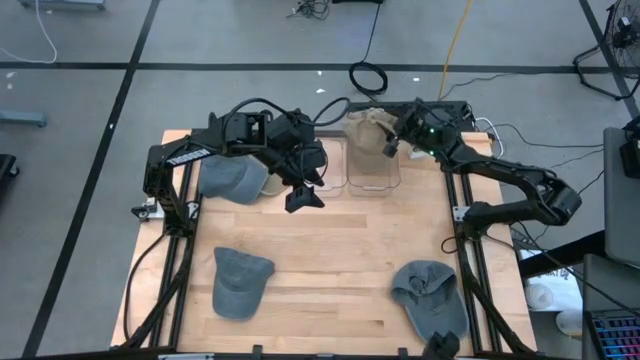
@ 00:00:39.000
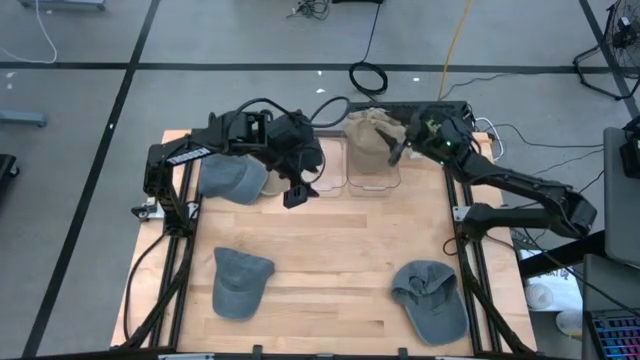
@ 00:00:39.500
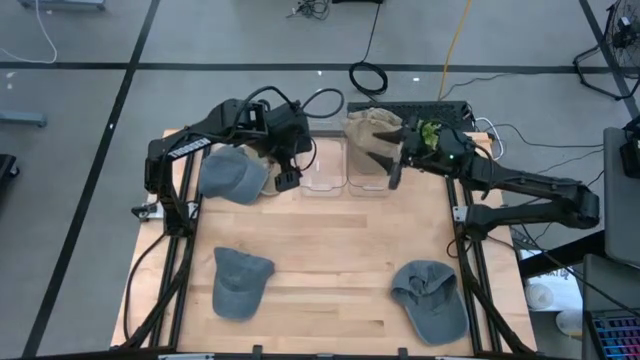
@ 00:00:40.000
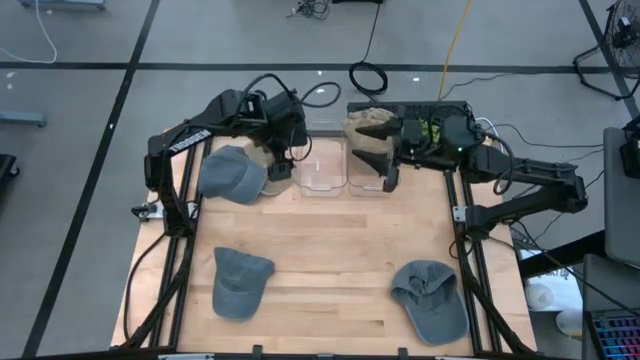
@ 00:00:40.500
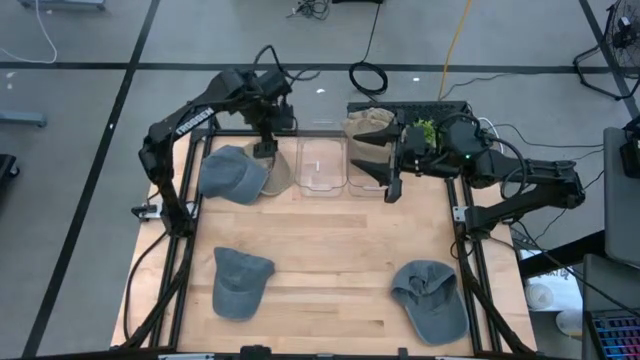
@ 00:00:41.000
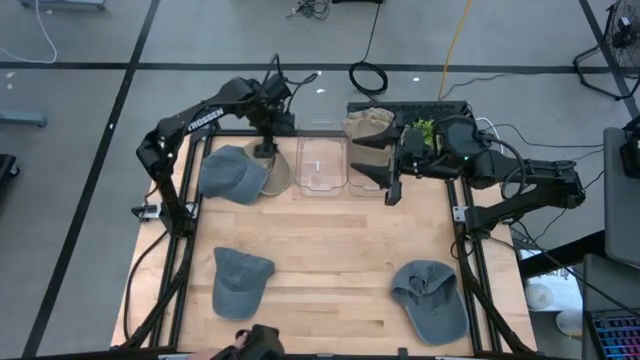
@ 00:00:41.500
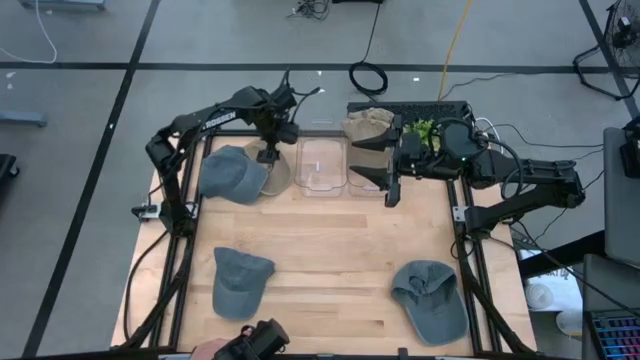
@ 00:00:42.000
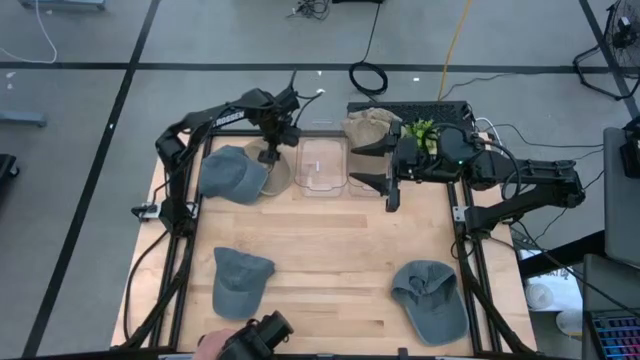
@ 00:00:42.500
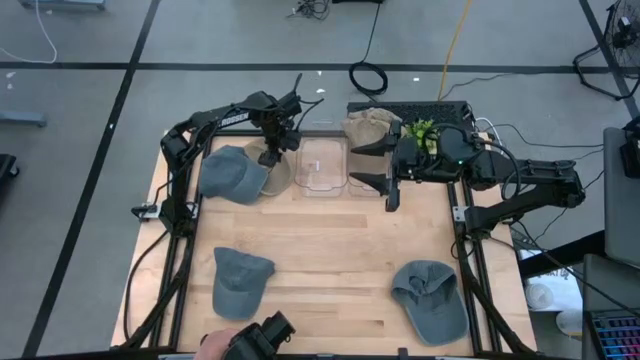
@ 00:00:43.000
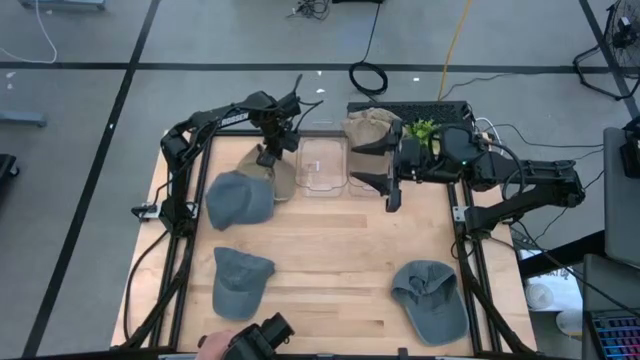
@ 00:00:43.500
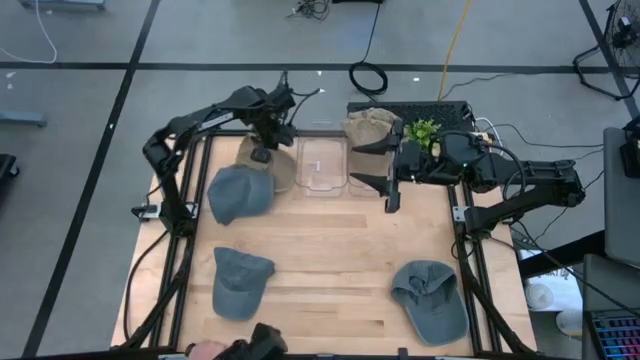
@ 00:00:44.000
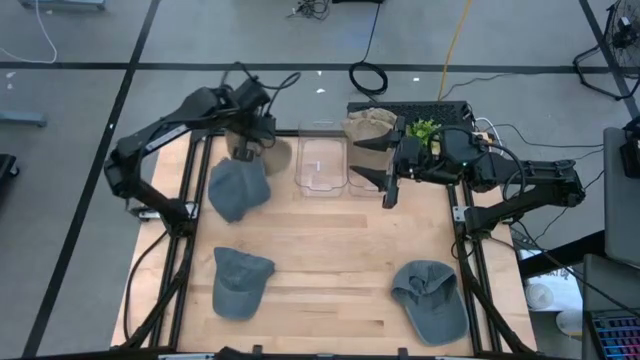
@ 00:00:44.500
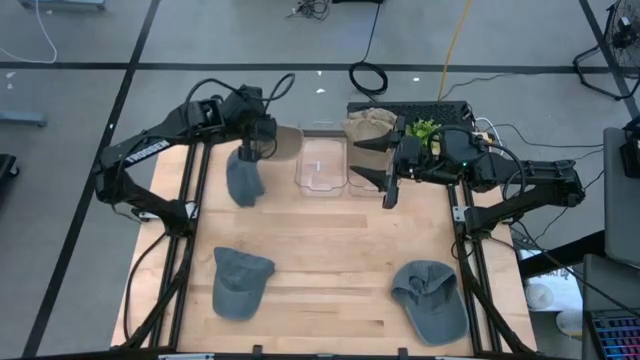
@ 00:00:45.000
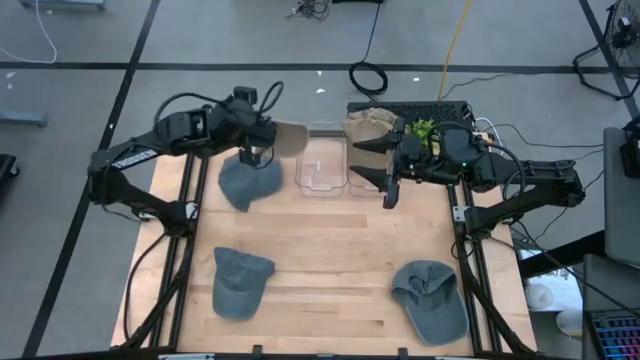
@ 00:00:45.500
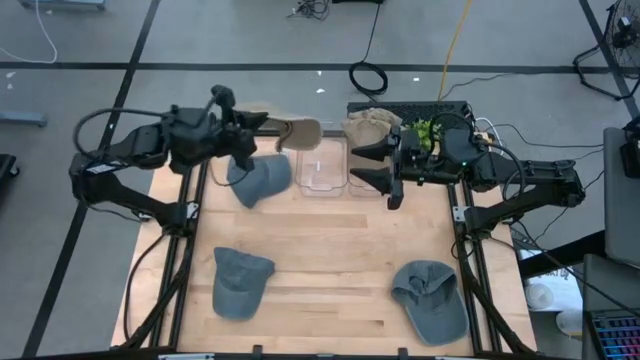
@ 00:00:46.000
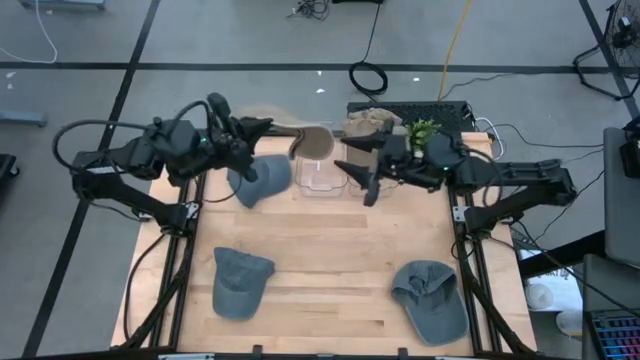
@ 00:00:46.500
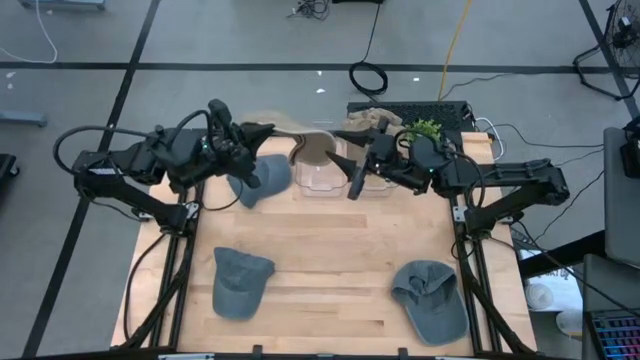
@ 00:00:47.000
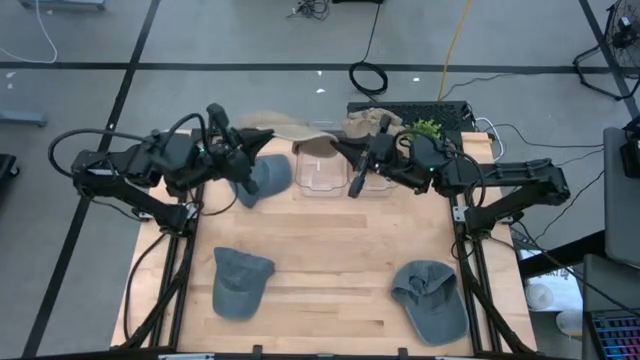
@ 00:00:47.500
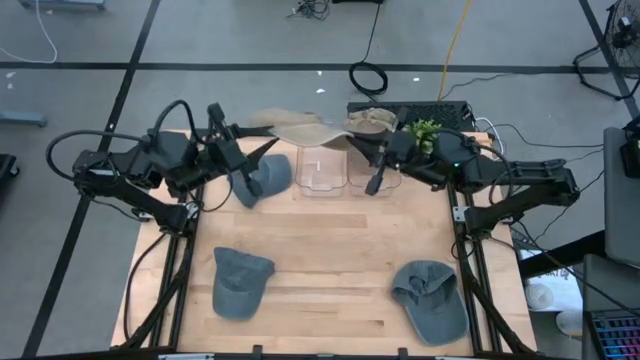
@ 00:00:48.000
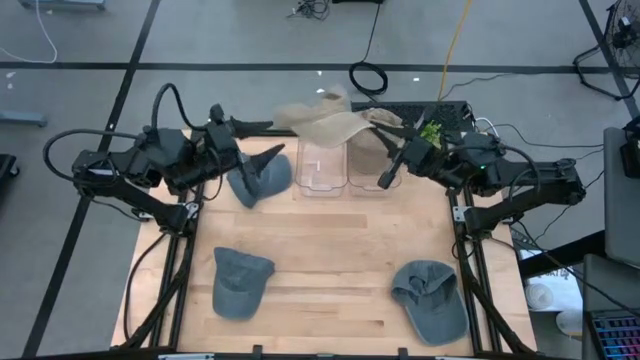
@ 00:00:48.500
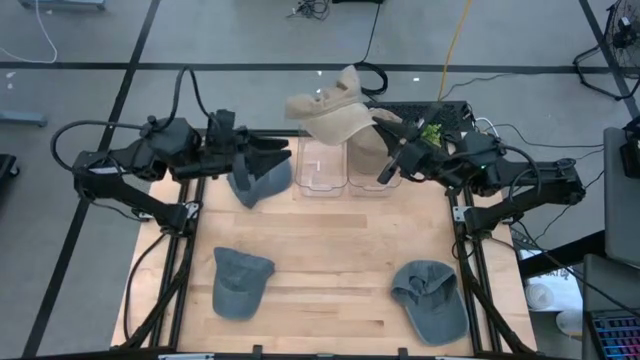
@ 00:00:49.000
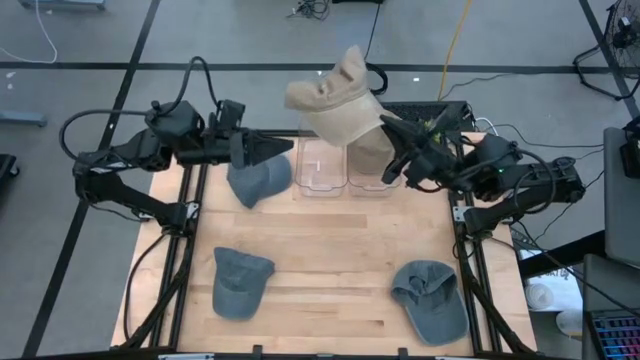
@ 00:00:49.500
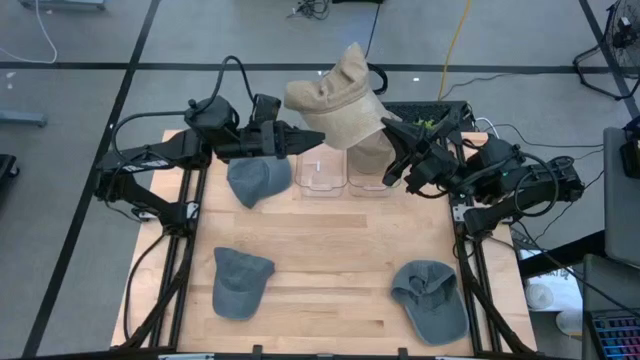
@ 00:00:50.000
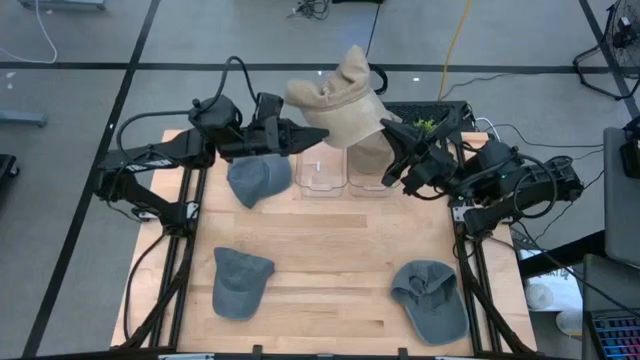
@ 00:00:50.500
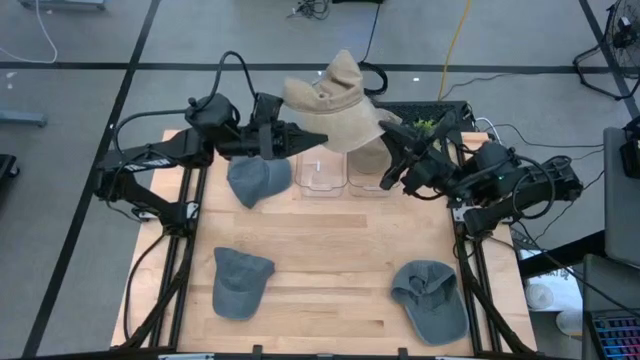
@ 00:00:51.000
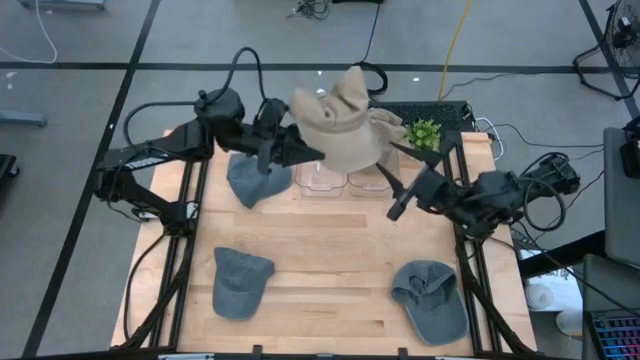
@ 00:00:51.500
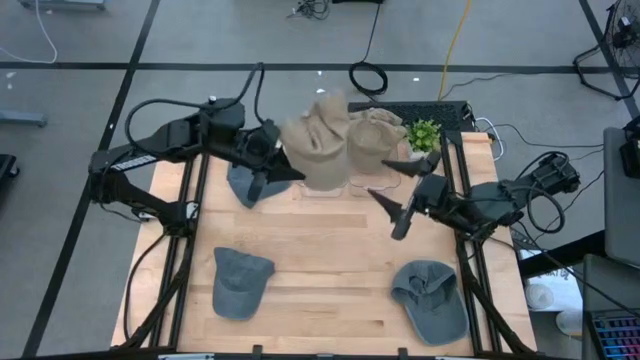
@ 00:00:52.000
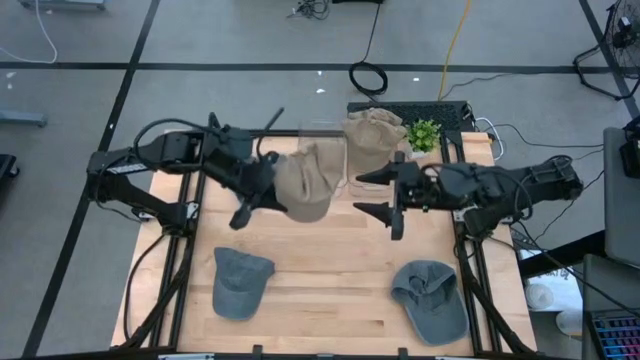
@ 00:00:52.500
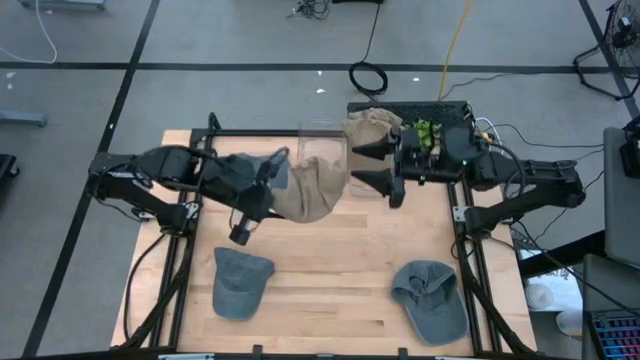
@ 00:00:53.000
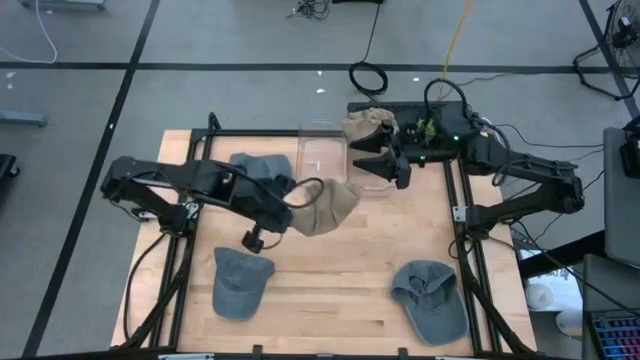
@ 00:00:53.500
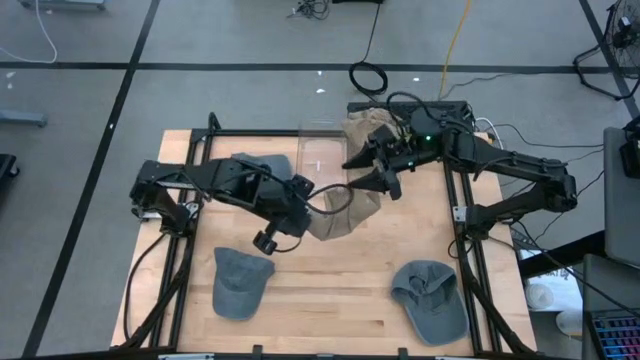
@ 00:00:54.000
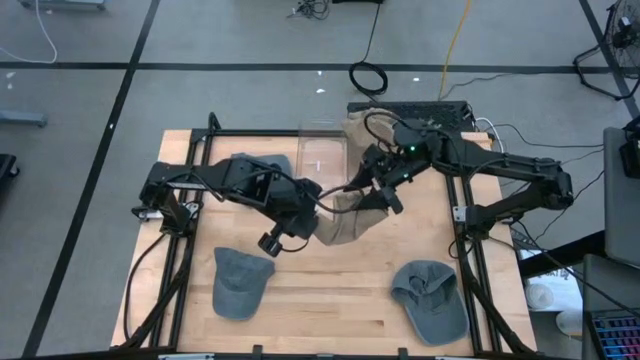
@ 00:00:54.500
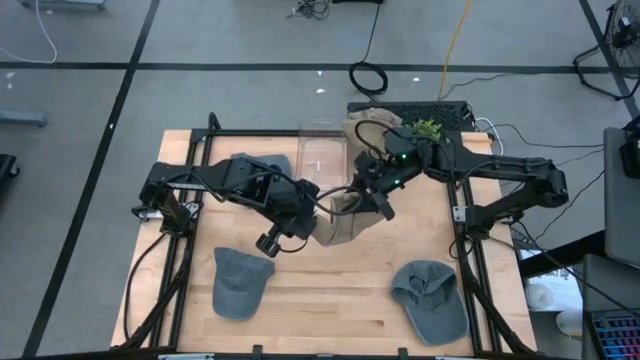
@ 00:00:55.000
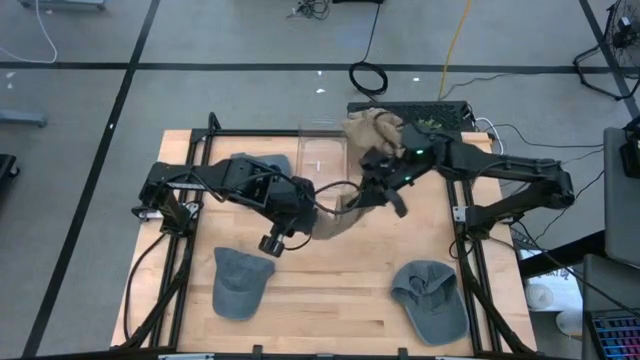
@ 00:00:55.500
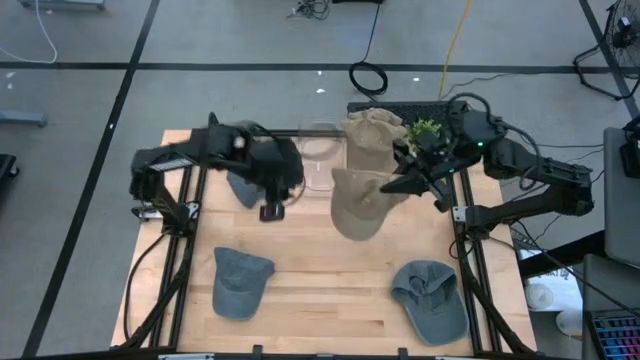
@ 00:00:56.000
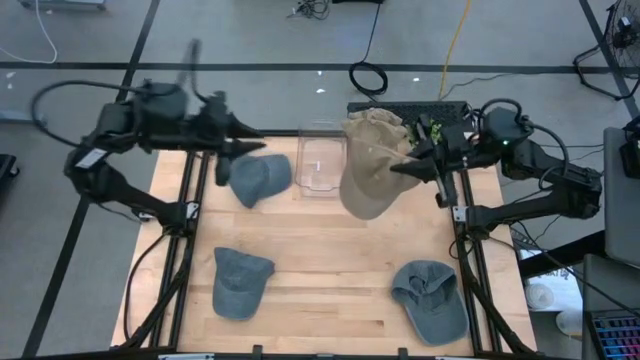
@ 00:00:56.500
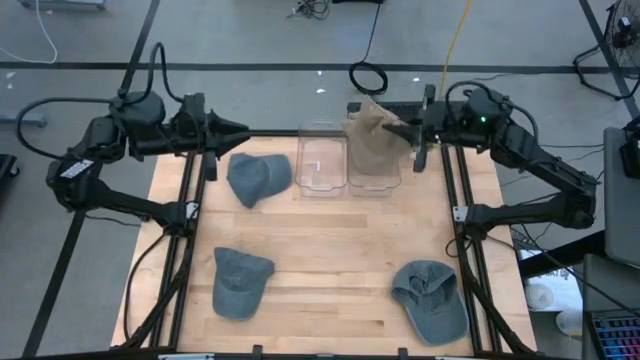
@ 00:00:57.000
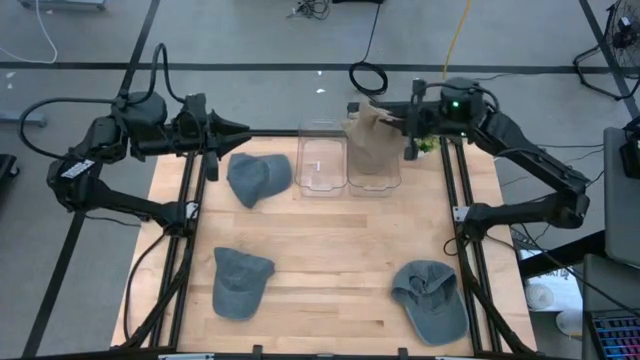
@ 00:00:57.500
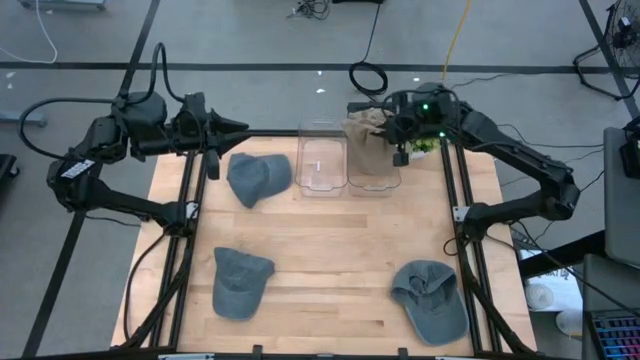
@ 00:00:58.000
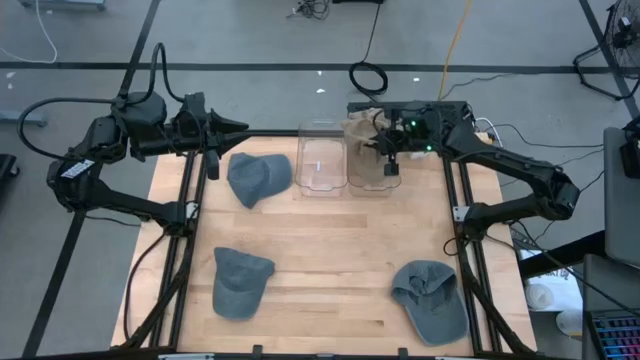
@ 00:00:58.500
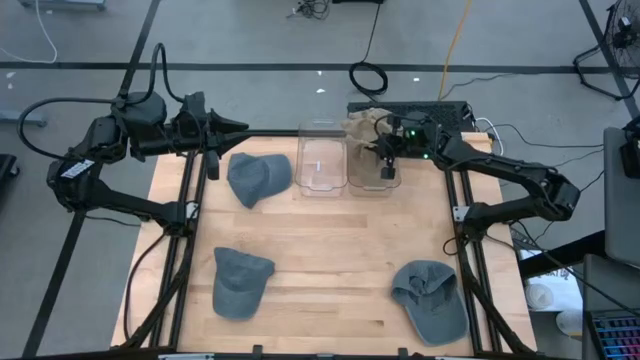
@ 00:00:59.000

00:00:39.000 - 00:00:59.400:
Task: Pick & Place hat
Put the brown cap into the right transparent bin
